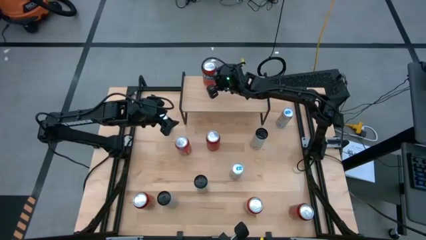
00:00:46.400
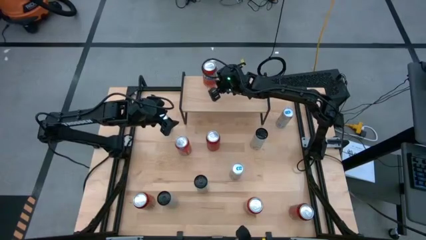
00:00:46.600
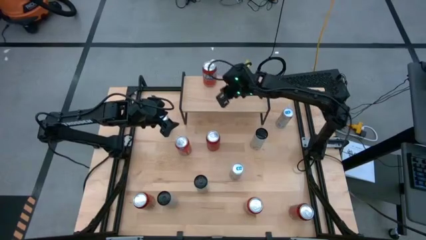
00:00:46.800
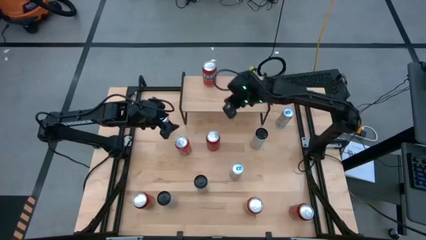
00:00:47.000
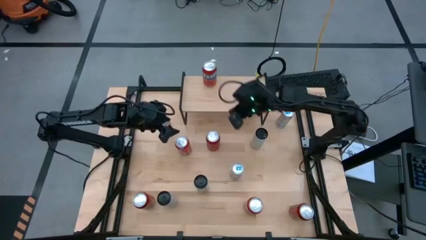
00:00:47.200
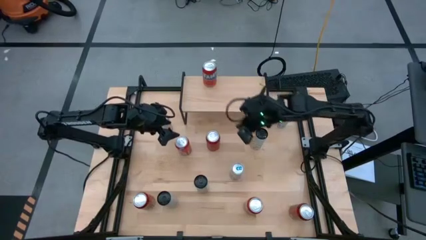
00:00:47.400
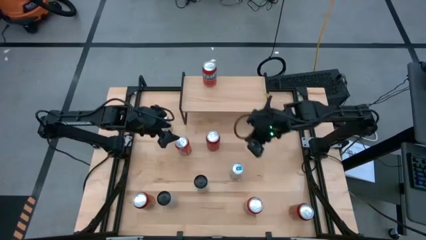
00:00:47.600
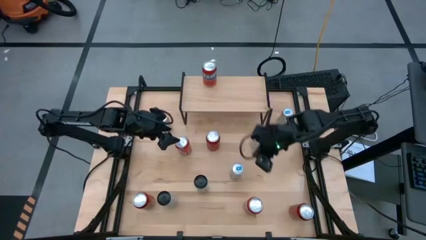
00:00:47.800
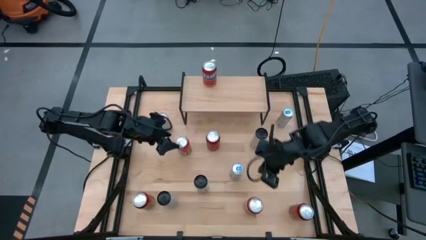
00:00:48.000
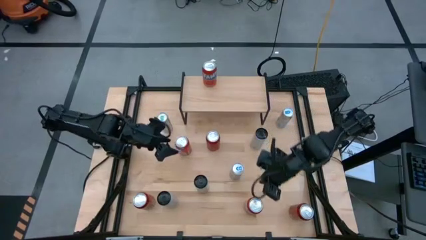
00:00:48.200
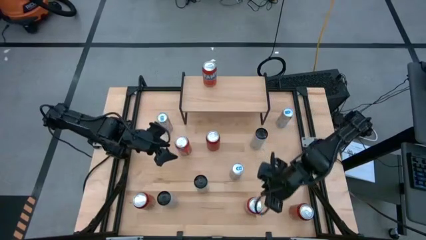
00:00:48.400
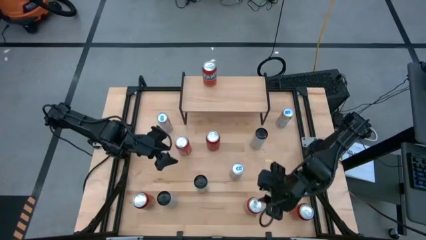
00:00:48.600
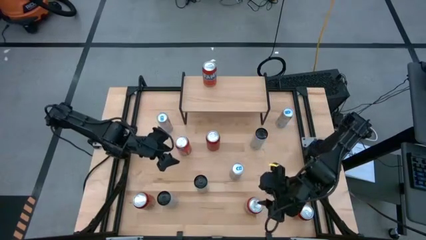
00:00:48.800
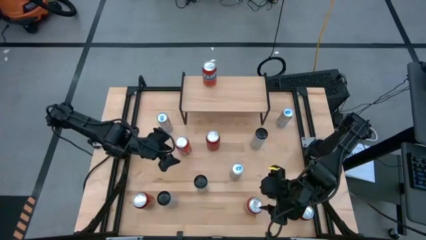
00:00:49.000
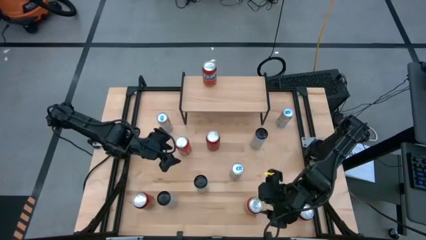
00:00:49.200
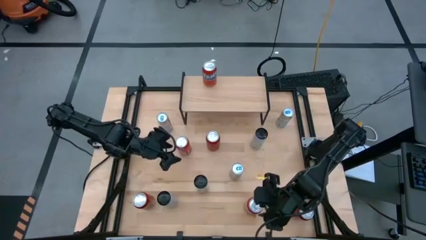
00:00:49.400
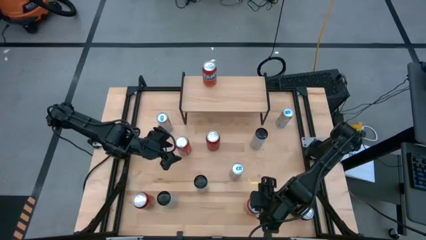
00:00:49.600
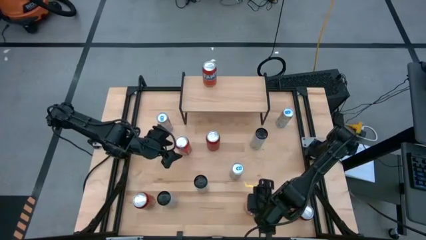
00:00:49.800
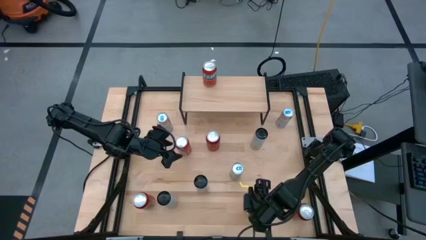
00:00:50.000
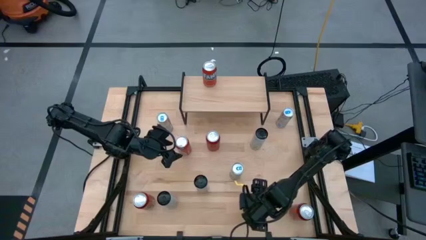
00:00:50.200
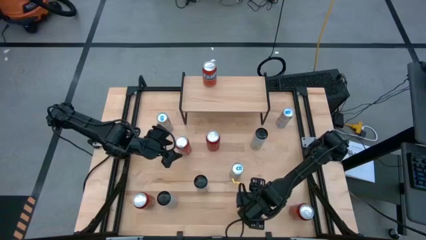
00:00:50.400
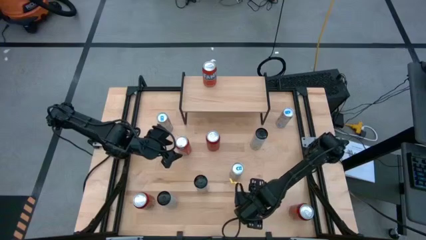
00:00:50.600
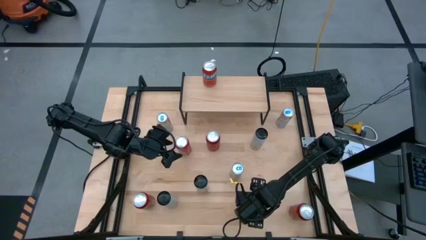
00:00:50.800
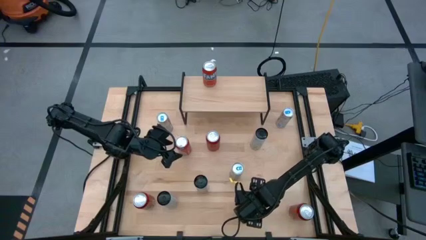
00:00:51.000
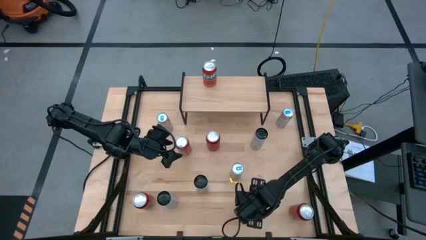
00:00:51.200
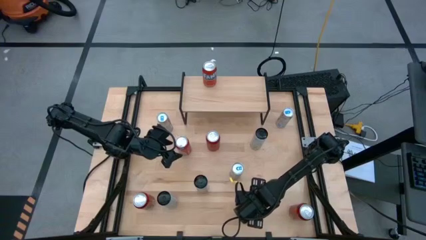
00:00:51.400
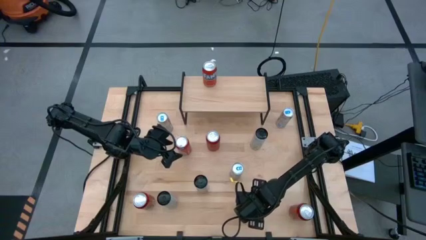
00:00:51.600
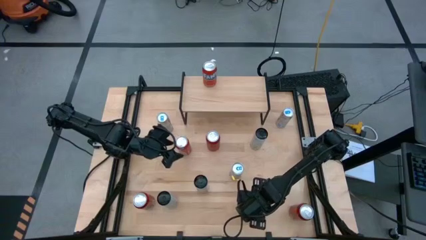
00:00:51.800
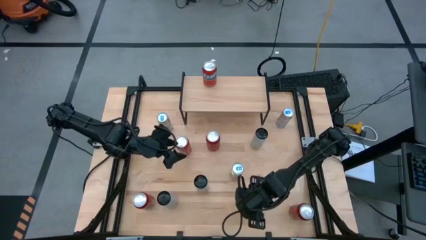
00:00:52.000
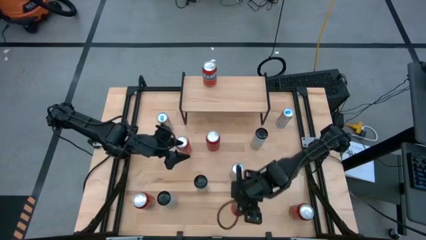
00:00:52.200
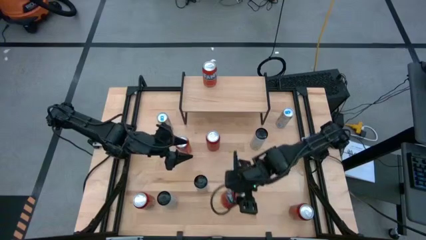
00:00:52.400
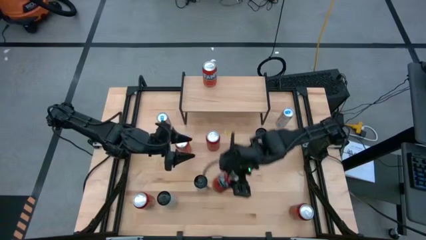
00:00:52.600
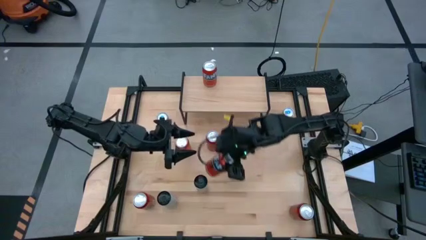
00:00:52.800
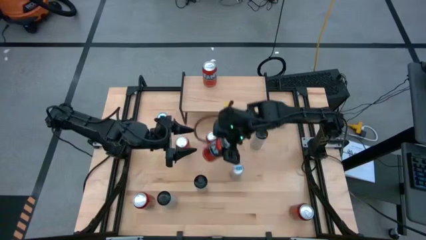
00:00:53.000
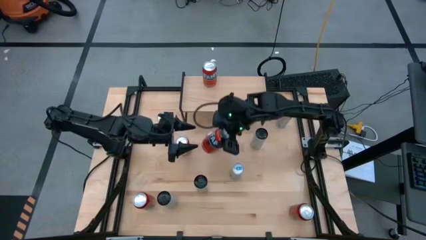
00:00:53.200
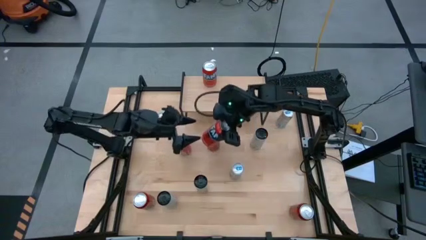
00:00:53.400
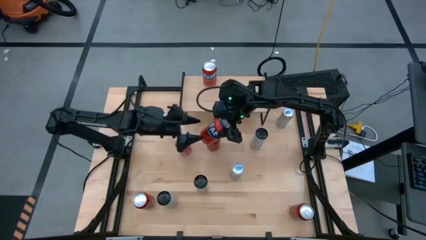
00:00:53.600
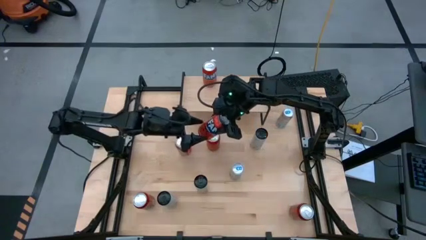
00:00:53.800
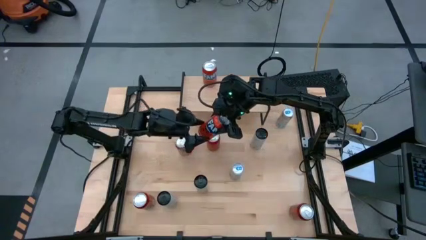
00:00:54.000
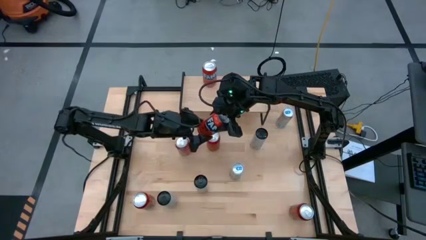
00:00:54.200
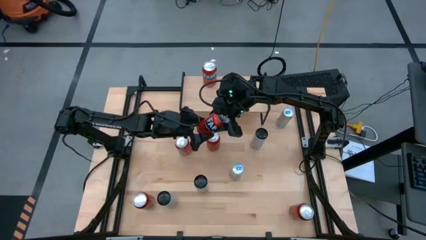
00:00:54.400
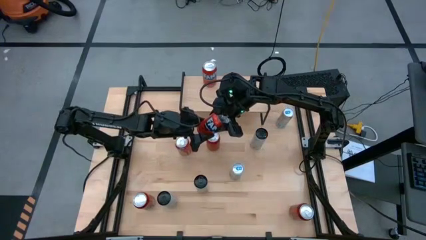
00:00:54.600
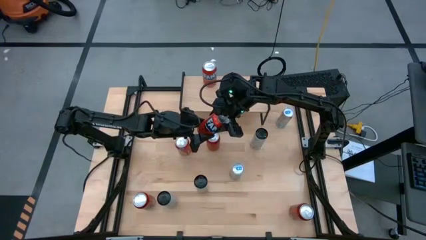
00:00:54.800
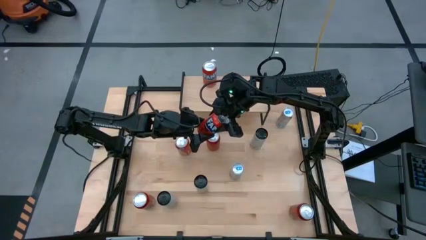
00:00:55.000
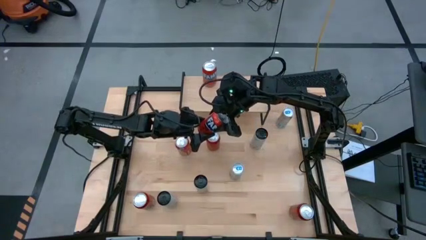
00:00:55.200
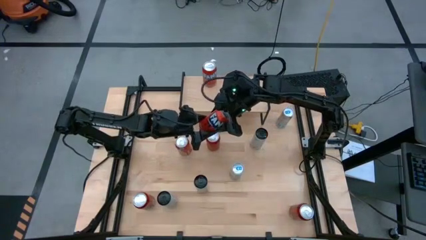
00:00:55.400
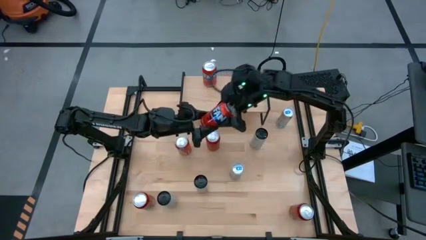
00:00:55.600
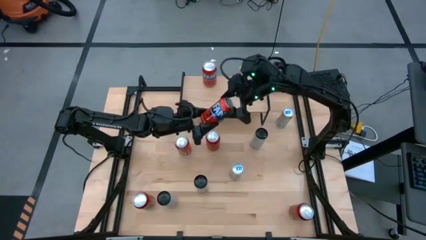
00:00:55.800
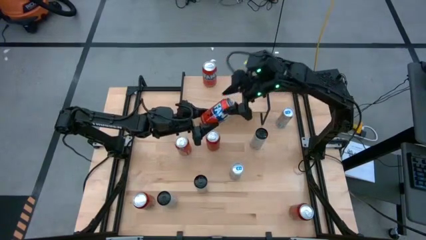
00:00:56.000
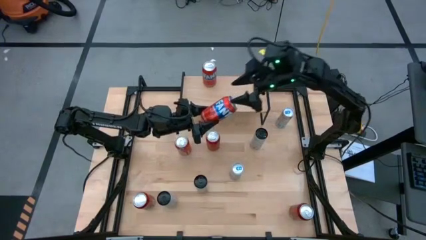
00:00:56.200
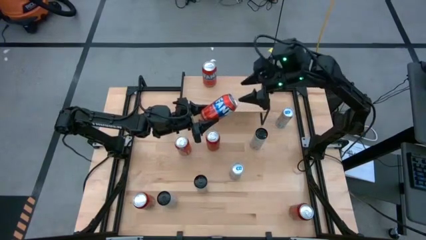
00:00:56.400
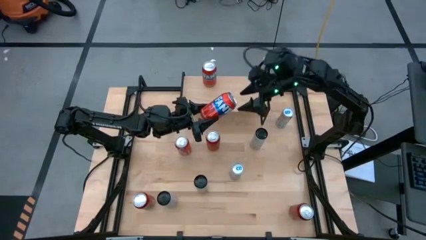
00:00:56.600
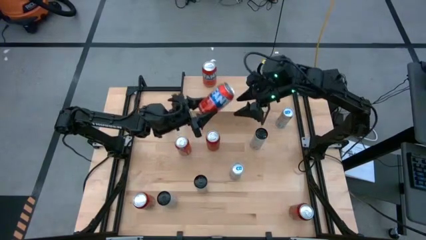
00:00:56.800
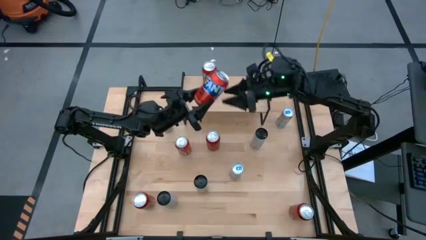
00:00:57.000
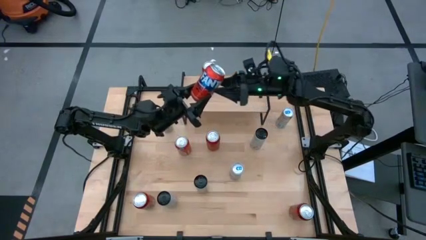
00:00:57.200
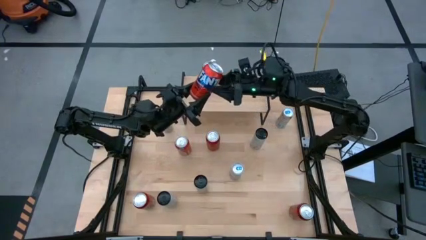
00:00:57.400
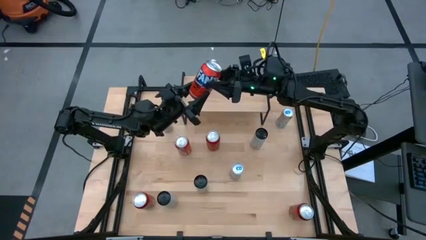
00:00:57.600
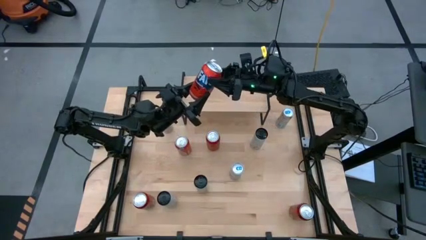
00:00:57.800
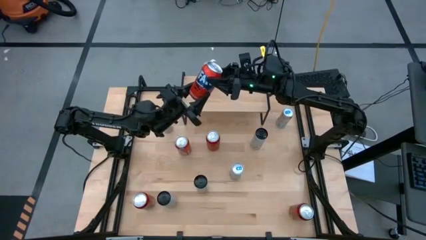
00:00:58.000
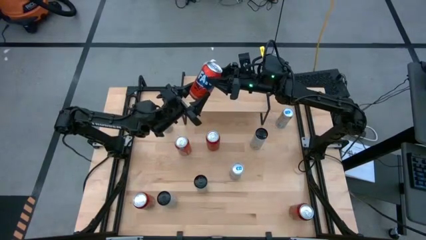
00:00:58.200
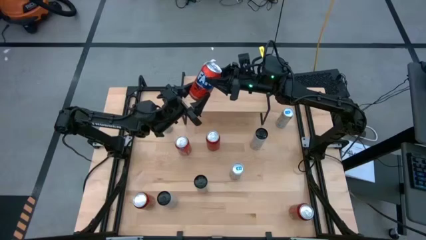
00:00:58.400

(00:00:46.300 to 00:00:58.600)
Task: Place canned beverage on shelf
Put the bottom red soda can on the shelf aligned with the other red soda can

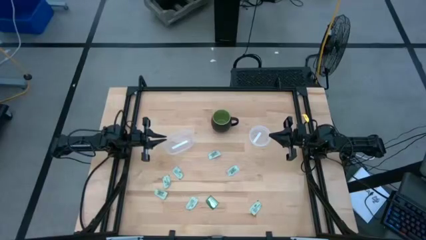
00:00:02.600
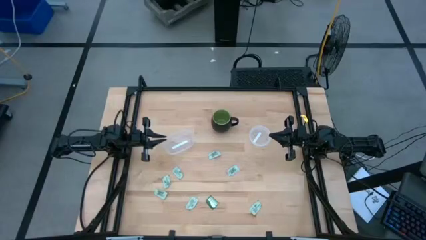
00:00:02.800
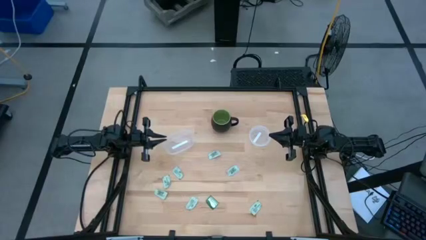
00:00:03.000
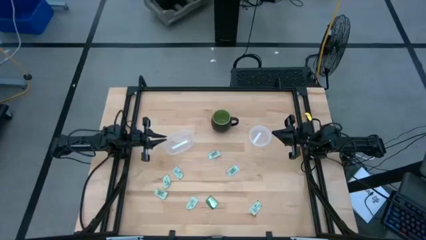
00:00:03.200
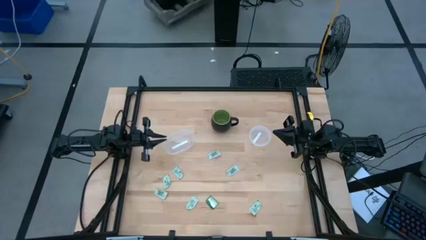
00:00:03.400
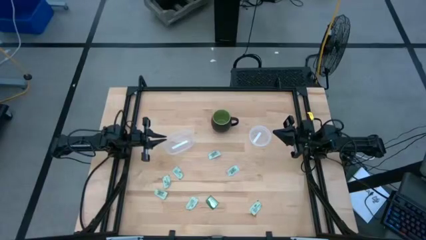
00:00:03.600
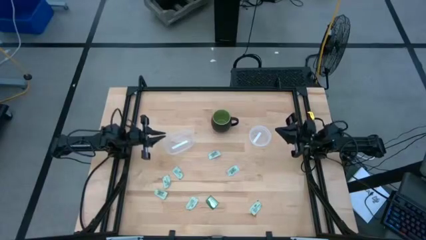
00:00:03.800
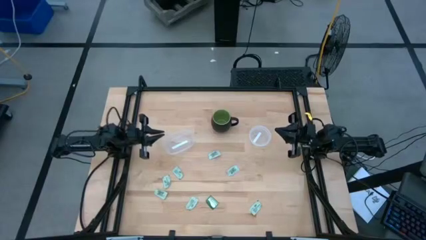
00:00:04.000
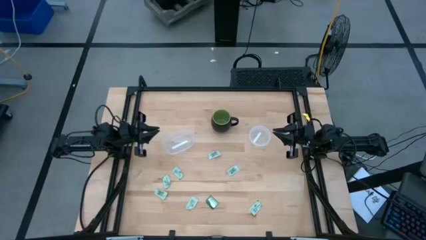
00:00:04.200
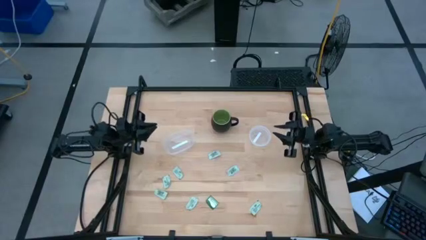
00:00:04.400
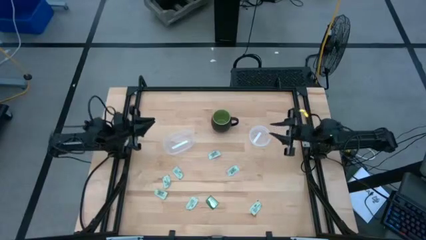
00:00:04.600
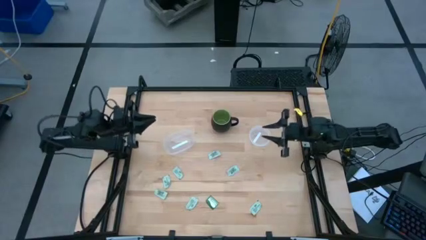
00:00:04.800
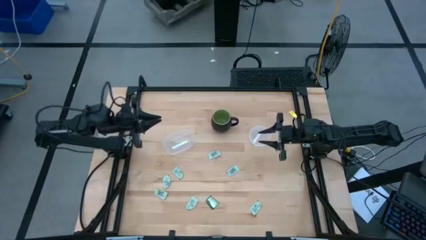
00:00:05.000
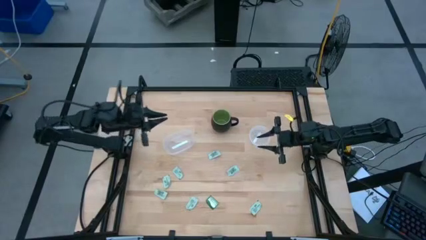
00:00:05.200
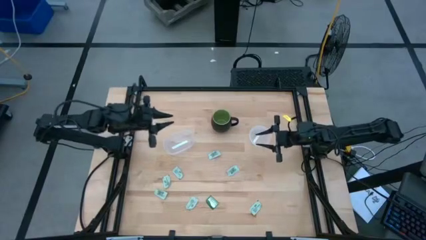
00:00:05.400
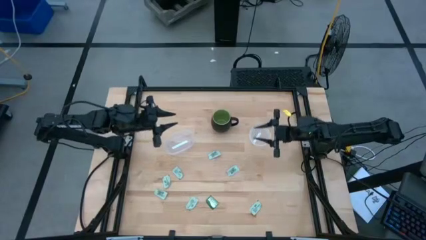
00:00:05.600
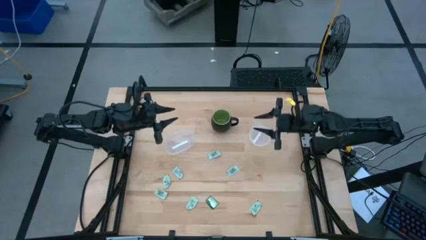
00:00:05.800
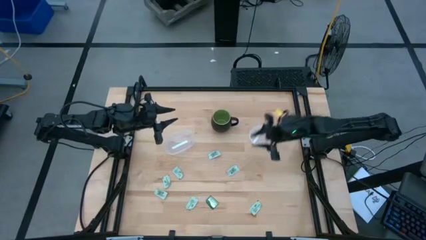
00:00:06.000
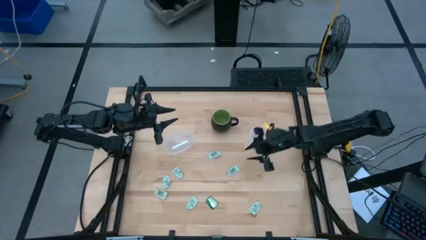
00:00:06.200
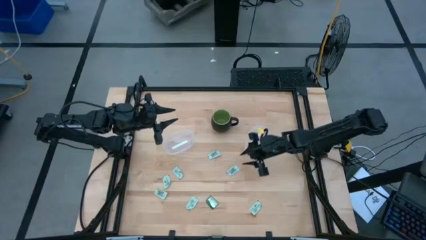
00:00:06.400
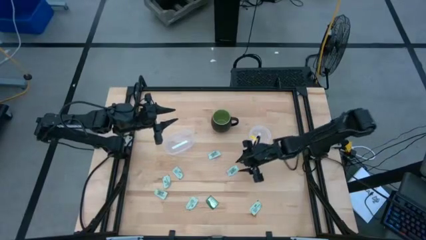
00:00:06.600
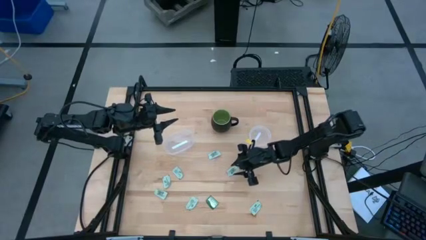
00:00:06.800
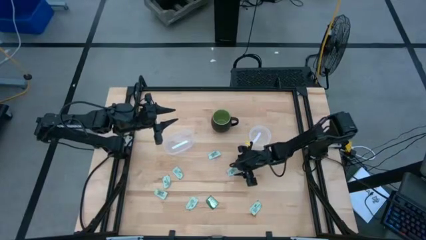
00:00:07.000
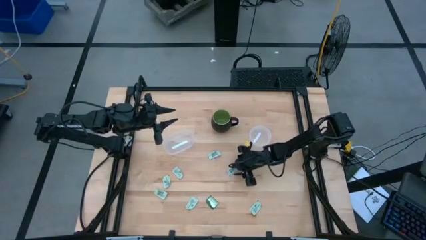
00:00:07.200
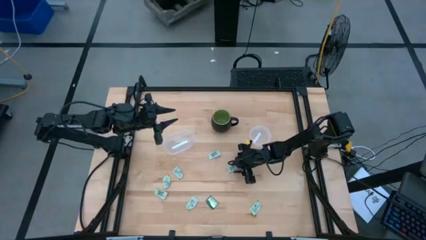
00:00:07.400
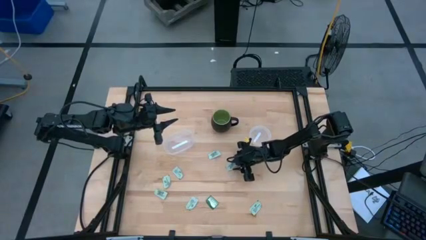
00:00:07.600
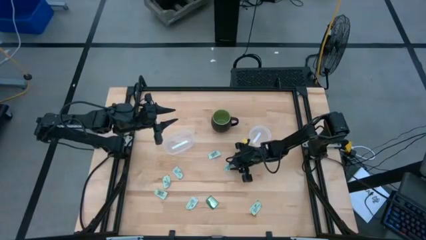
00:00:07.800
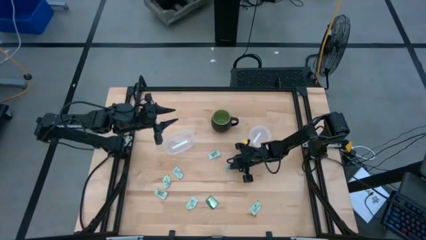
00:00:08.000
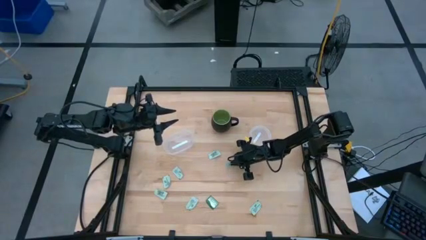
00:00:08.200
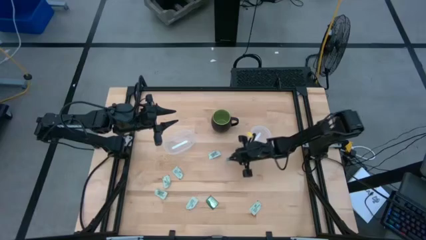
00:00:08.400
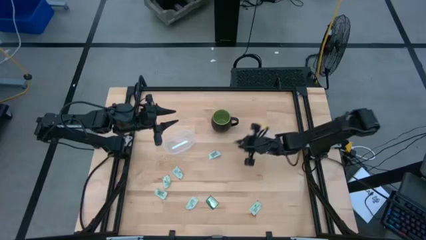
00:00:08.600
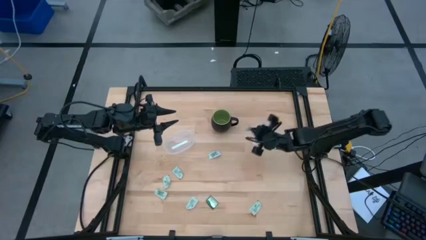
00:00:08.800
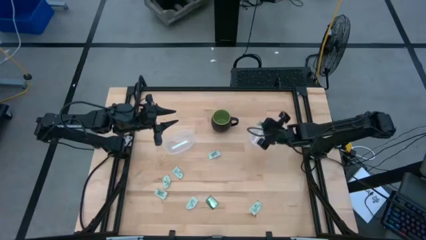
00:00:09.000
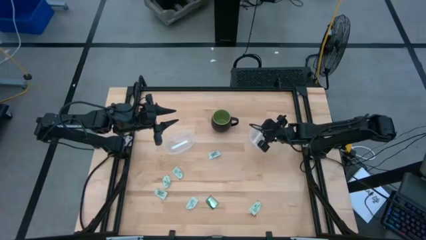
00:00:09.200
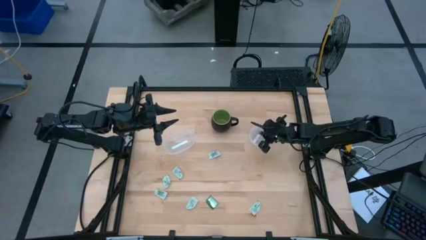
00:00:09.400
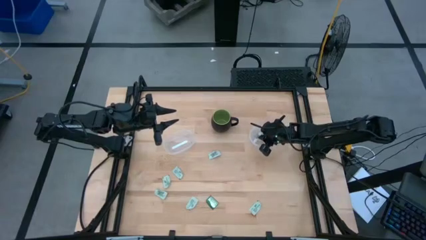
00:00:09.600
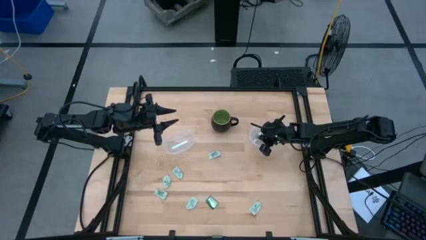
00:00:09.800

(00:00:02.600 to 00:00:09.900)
Task: Pick and place Stevia / Truvia into bins
Put the green stevia packet into the right transparent container
